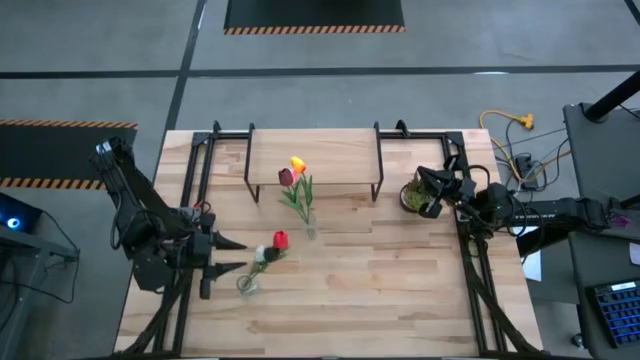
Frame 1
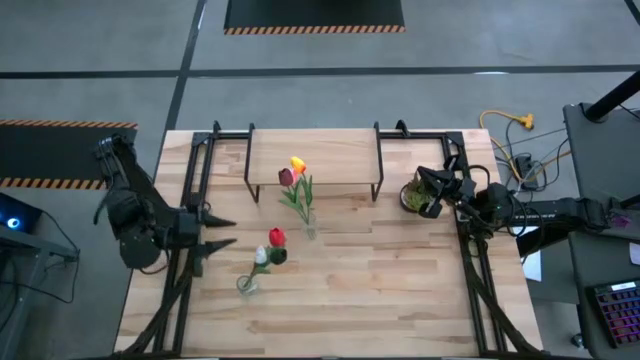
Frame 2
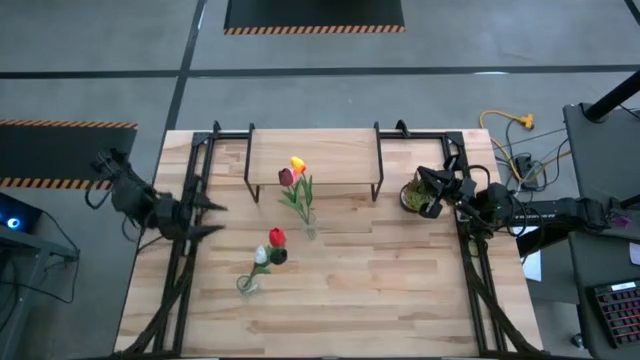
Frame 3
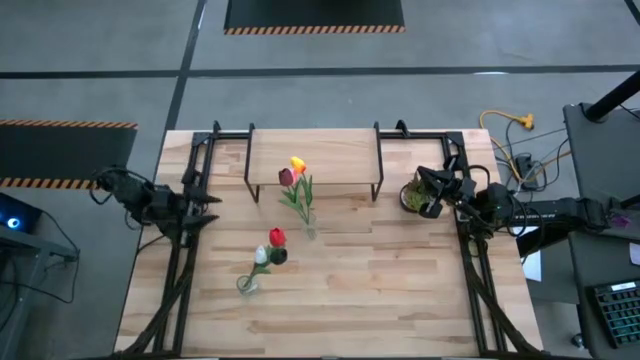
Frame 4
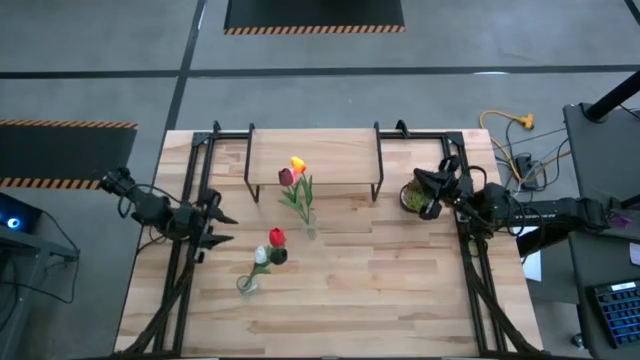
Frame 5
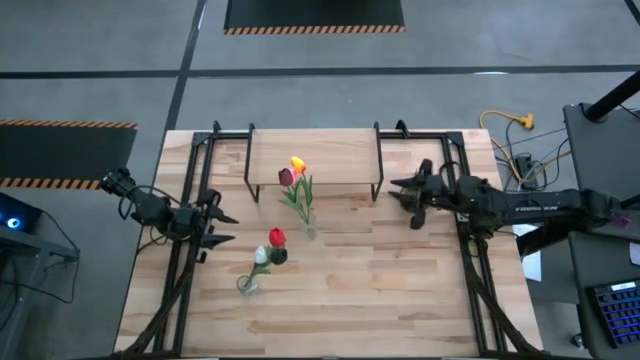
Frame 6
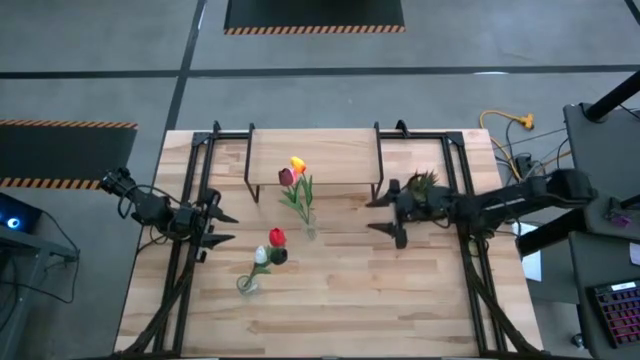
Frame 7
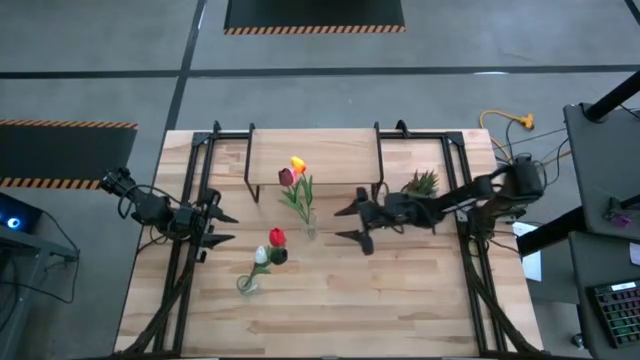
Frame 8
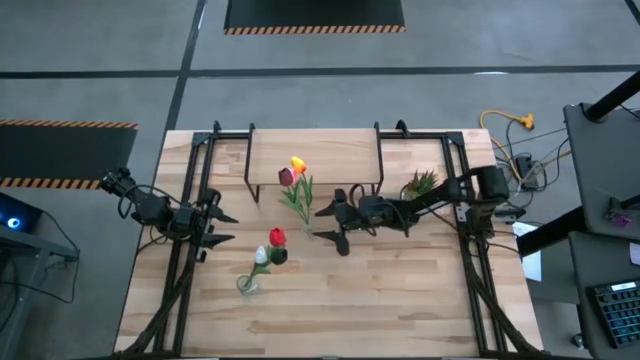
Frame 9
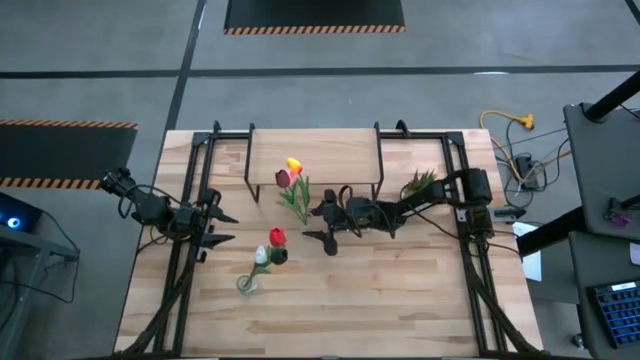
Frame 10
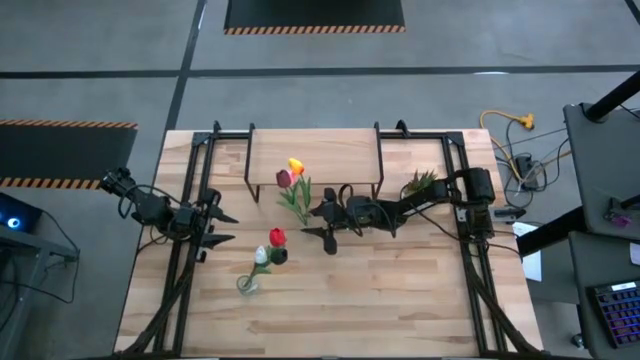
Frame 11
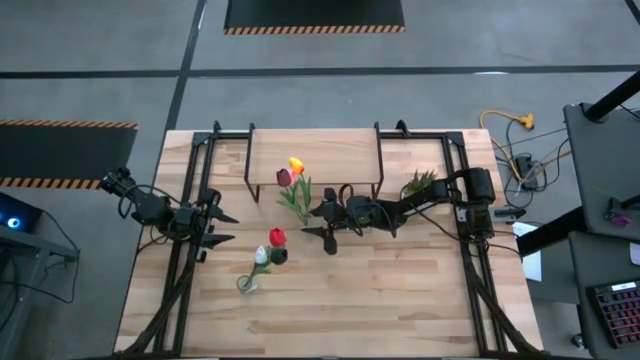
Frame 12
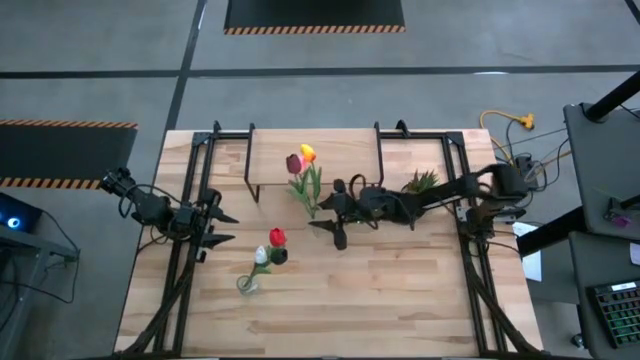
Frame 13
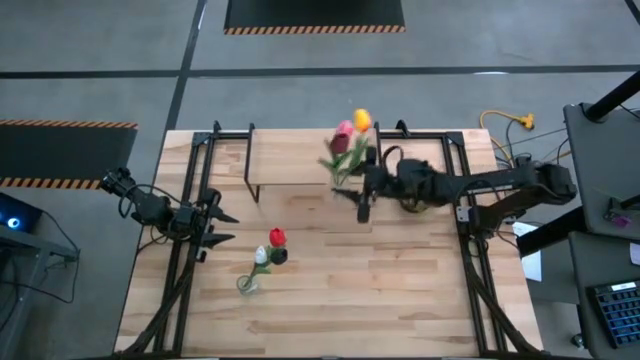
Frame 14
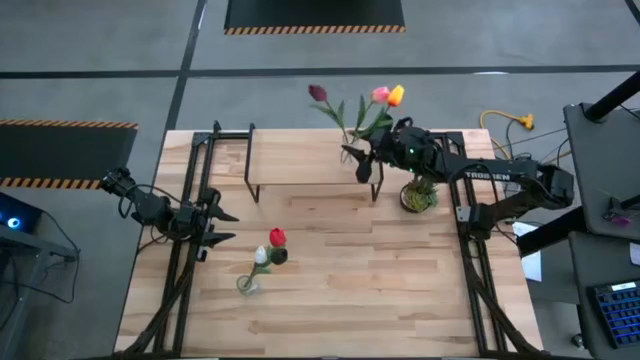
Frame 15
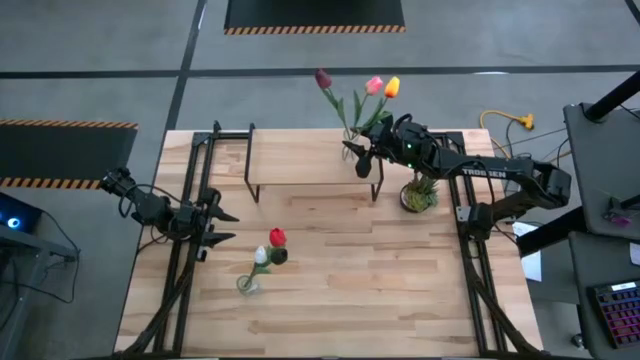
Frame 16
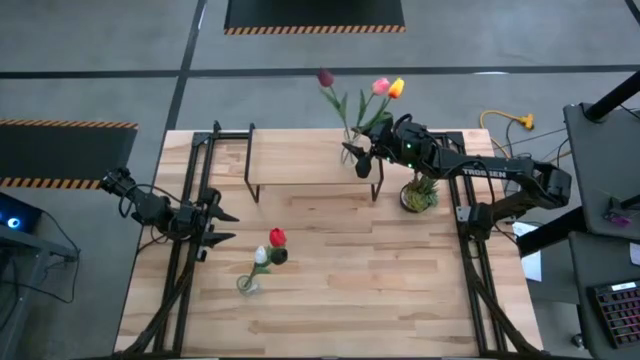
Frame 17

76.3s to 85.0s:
Task: Pick and place flowers into a vace then onto a shelf
Put the top transparent vase on the shelf

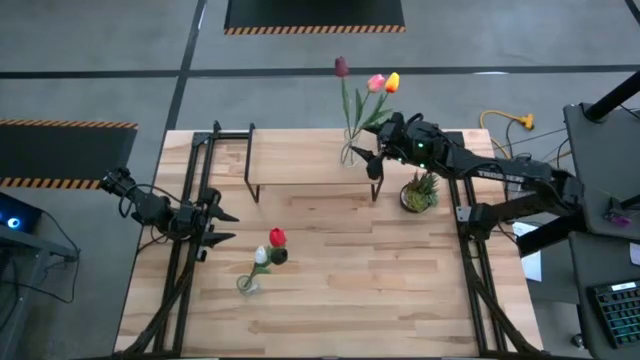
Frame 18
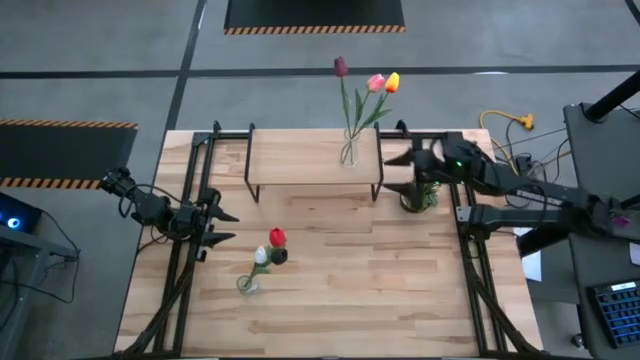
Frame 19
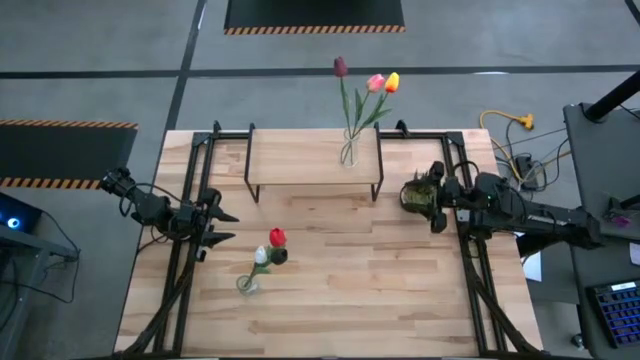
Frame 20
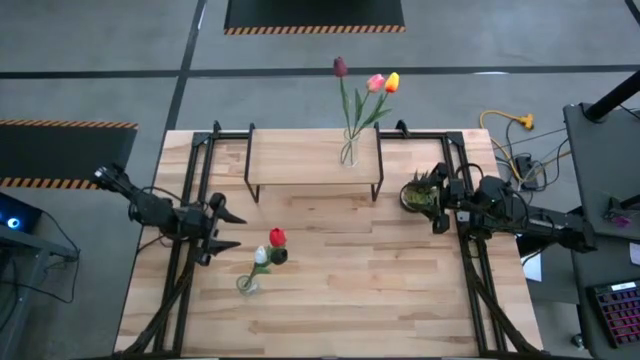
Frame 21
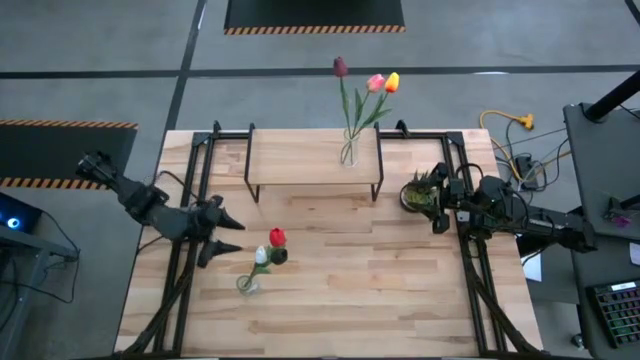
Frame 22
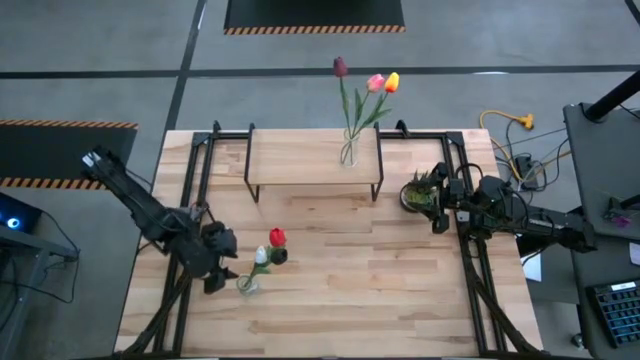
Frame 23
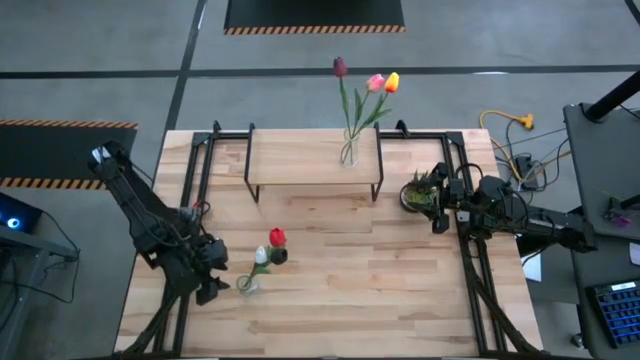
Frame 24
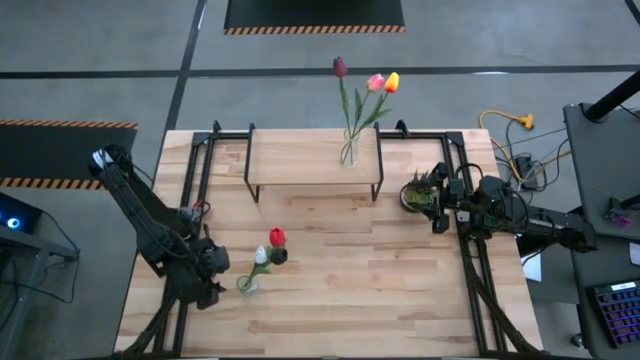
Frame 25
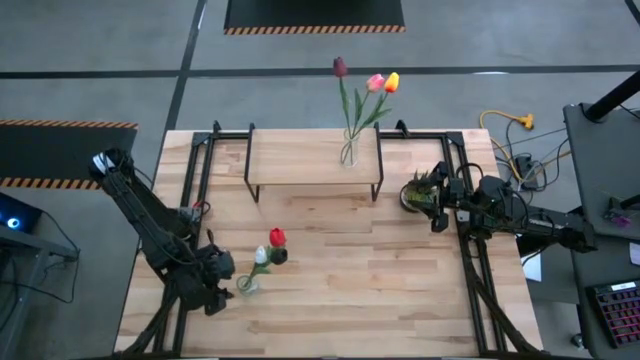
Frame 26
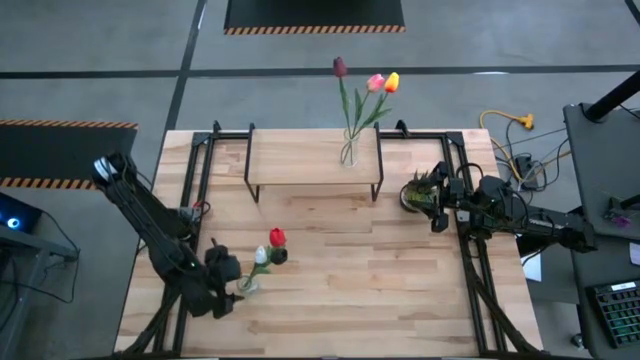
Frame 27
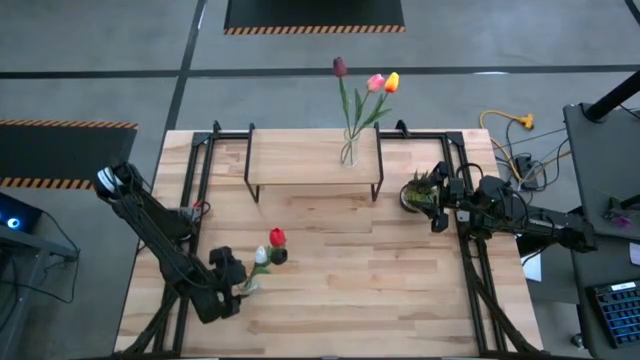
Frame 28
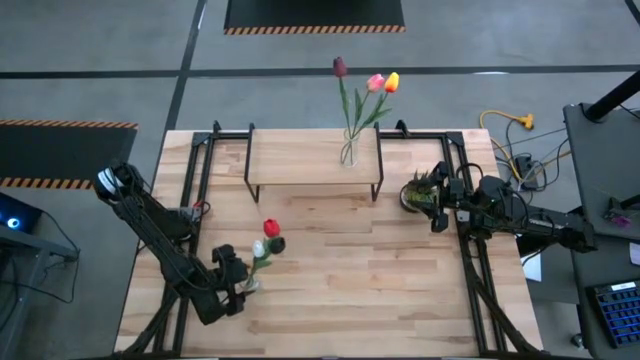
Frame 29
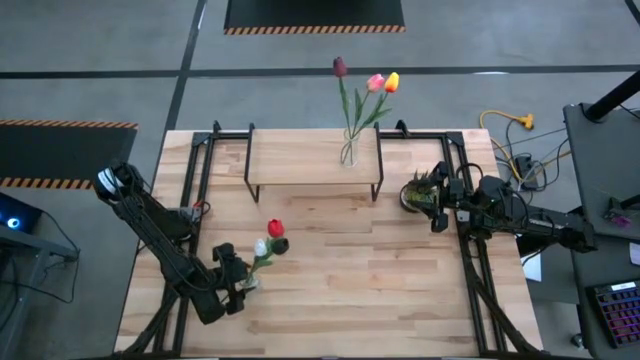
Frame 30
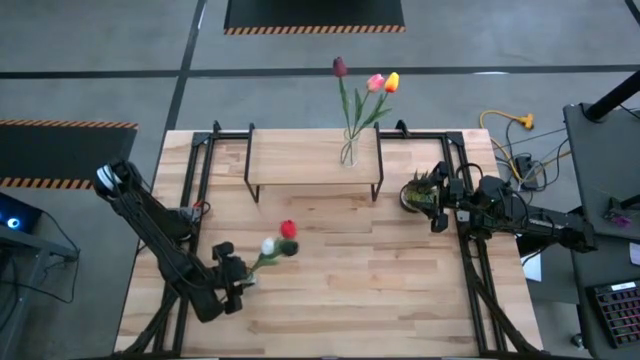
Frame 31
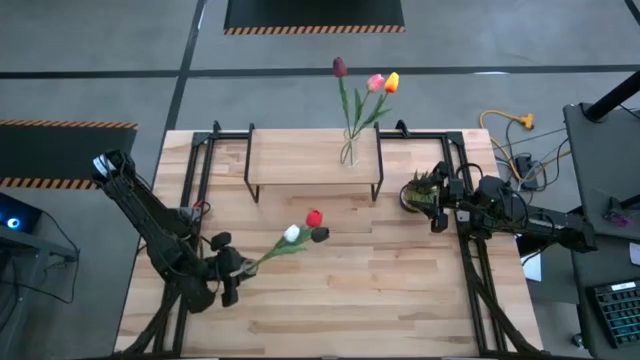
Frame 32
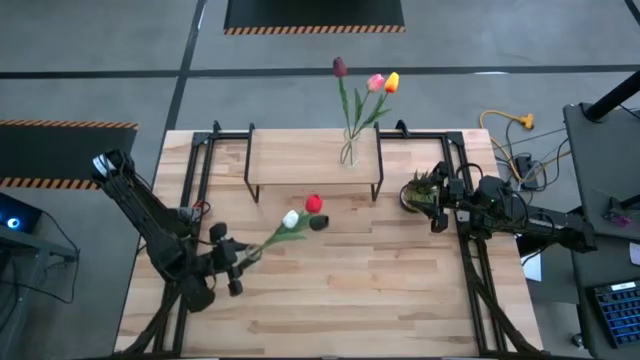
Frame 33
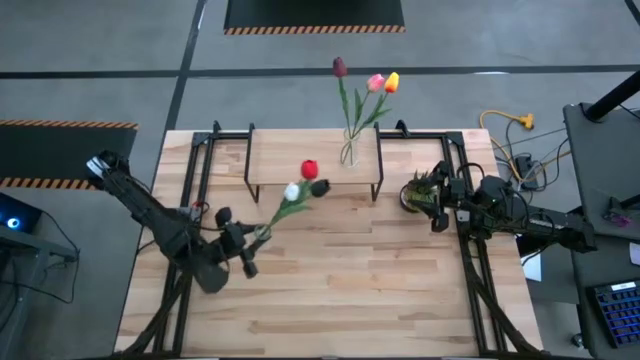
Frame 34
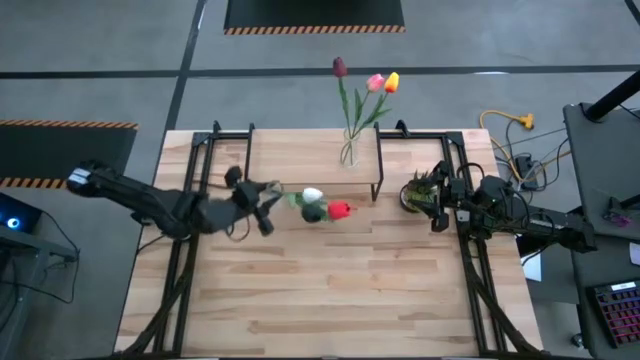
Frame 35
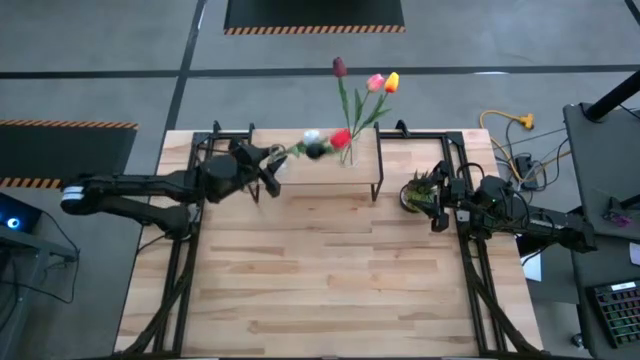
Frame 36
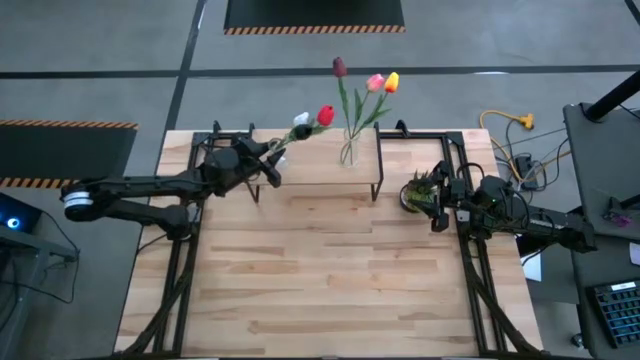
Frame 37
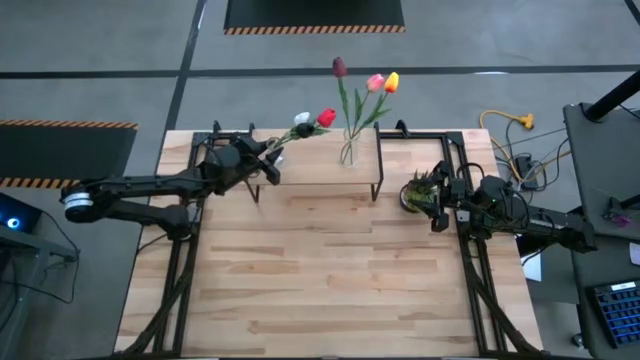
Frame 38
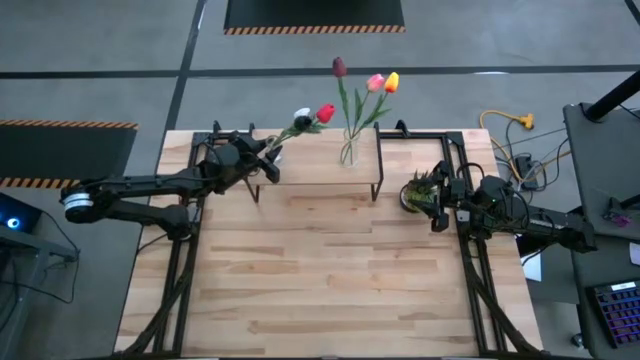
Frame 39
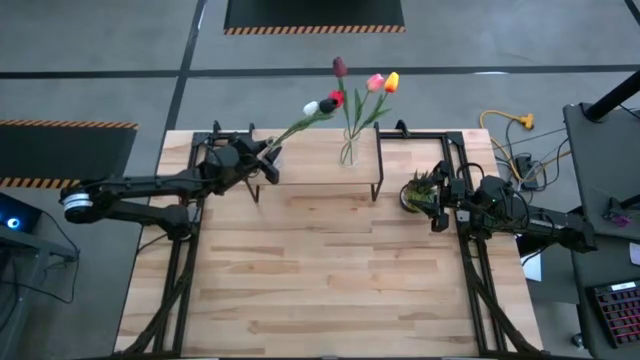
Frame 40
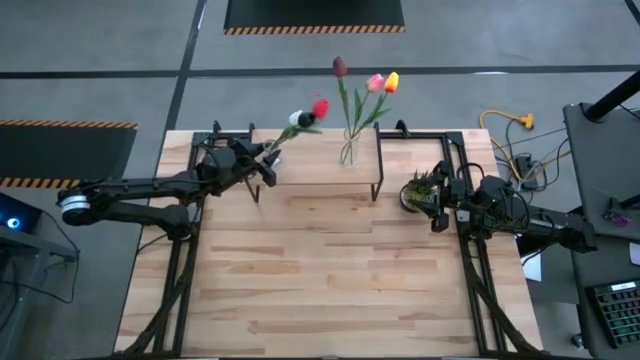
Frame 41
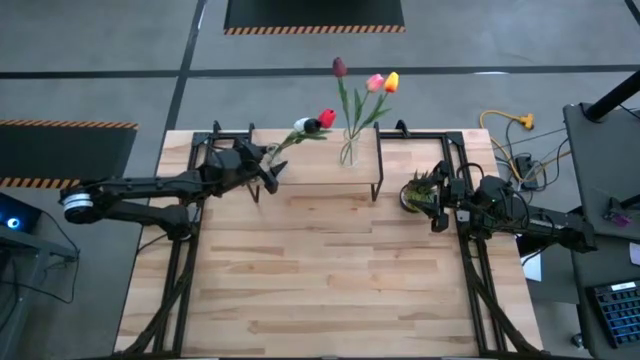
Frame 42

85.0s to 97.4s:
Put the transparent vase on the shelf
